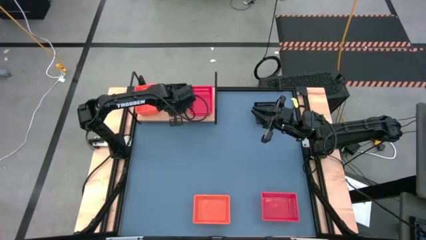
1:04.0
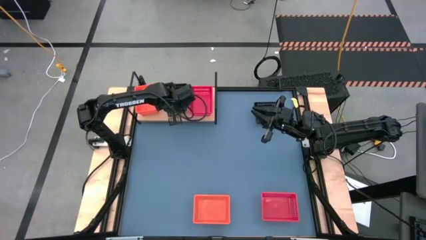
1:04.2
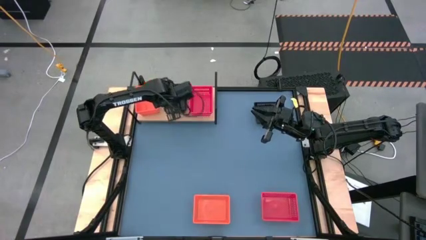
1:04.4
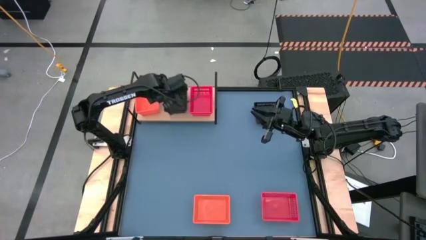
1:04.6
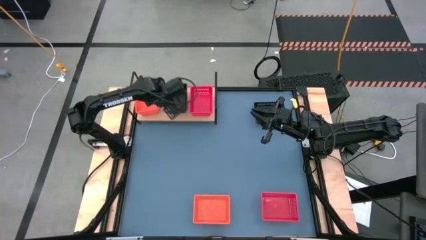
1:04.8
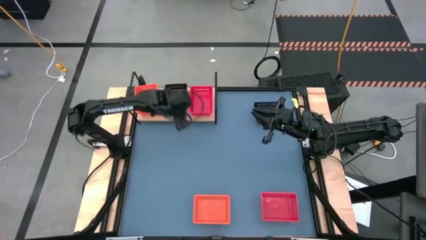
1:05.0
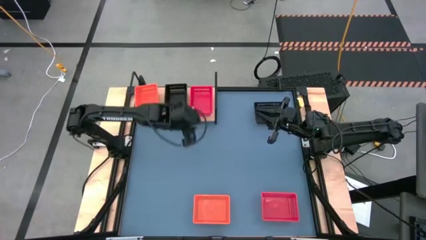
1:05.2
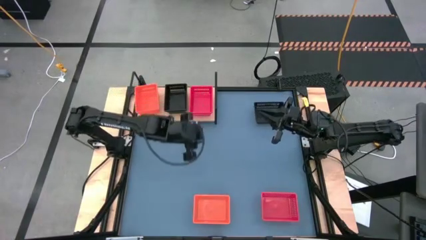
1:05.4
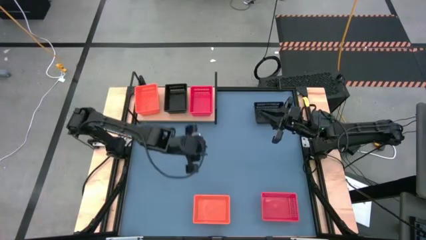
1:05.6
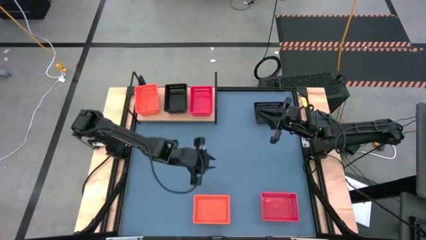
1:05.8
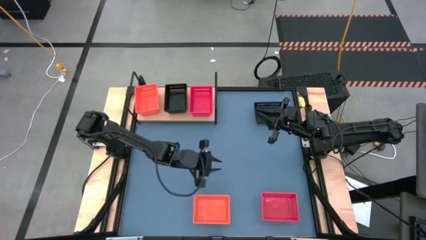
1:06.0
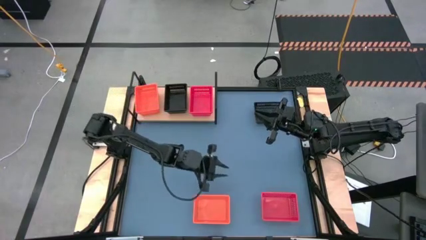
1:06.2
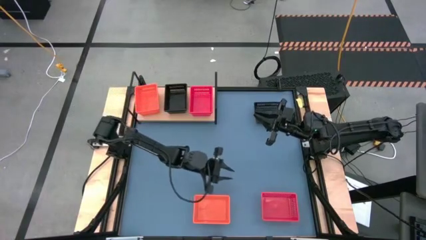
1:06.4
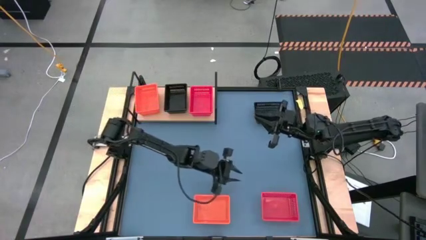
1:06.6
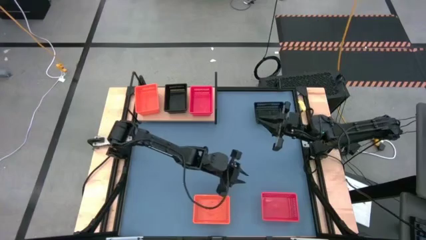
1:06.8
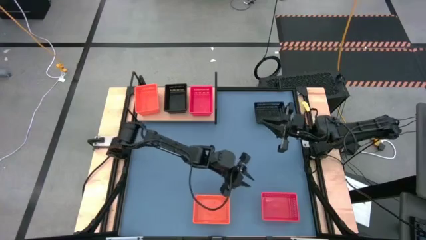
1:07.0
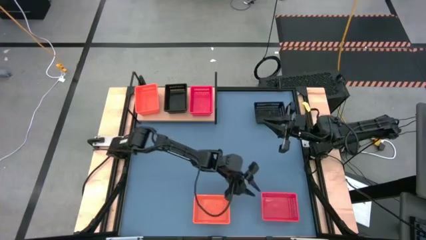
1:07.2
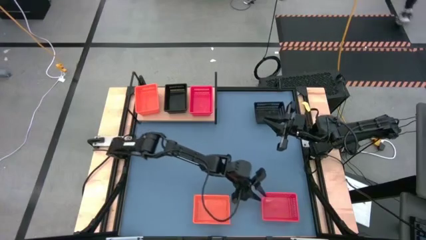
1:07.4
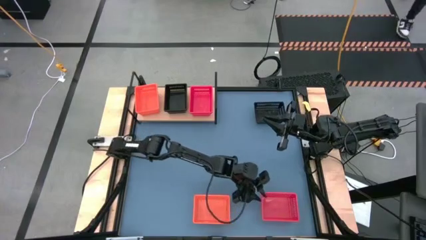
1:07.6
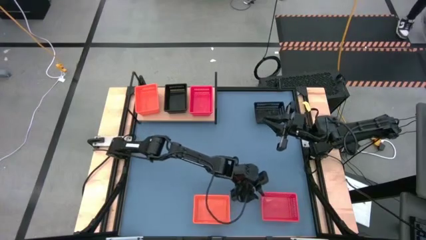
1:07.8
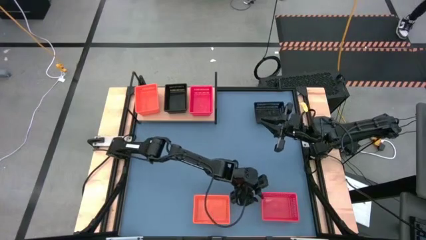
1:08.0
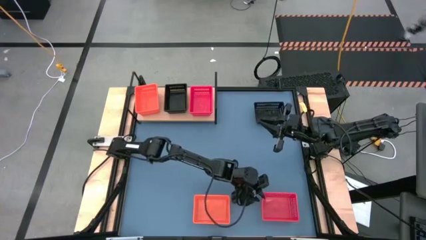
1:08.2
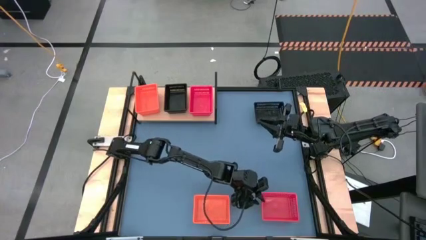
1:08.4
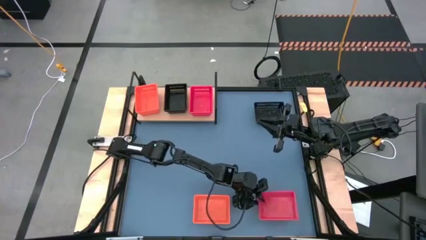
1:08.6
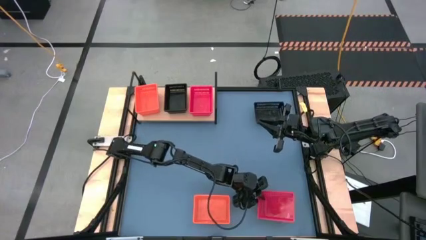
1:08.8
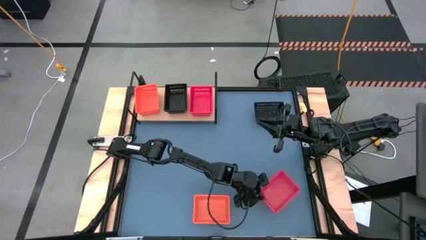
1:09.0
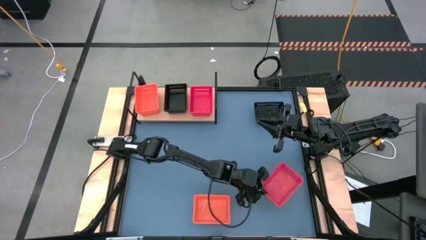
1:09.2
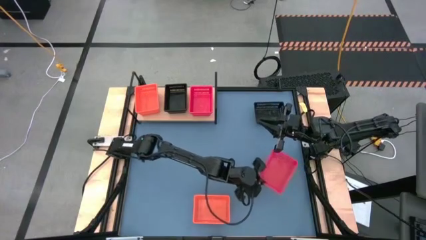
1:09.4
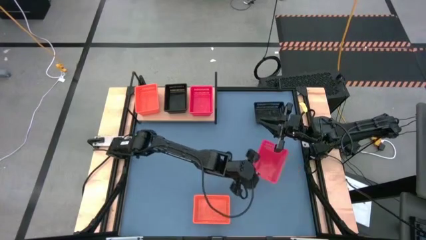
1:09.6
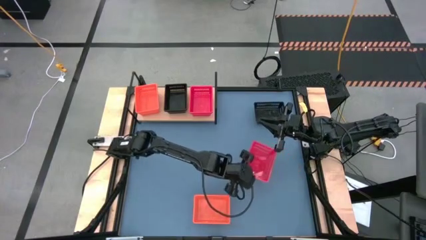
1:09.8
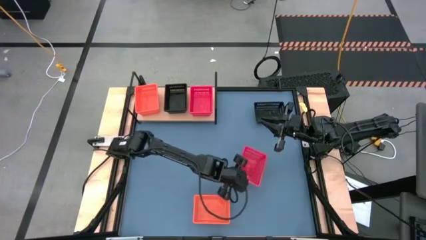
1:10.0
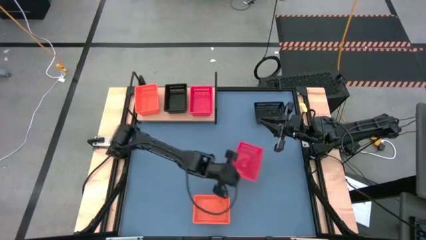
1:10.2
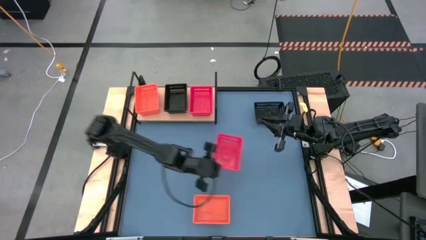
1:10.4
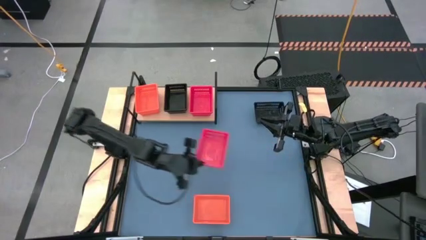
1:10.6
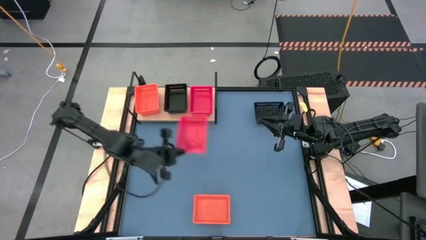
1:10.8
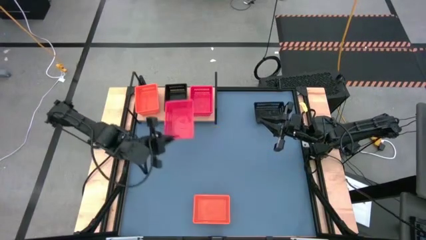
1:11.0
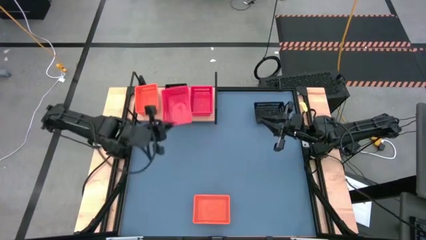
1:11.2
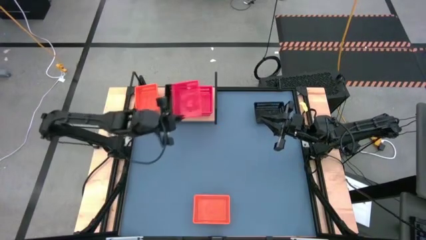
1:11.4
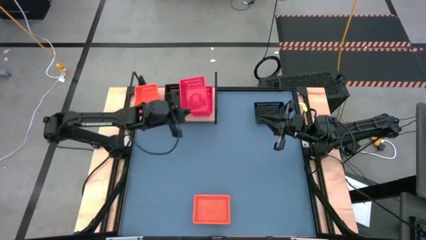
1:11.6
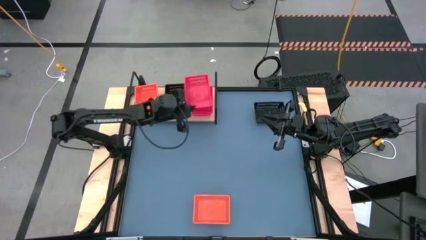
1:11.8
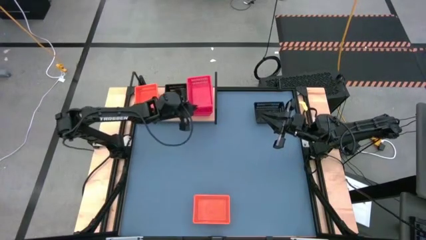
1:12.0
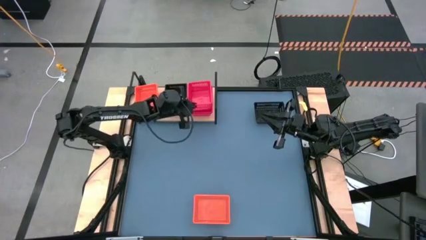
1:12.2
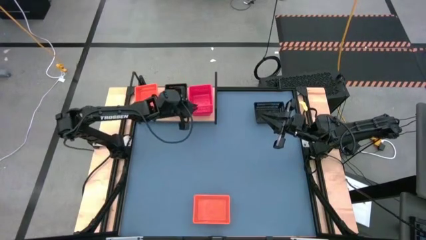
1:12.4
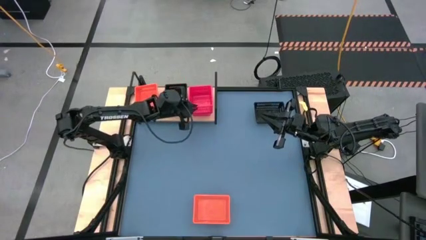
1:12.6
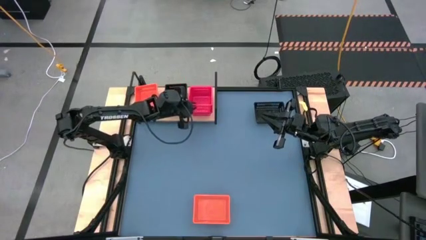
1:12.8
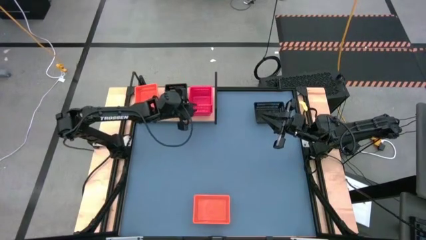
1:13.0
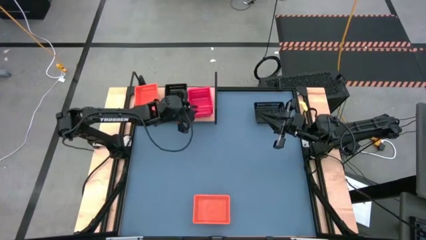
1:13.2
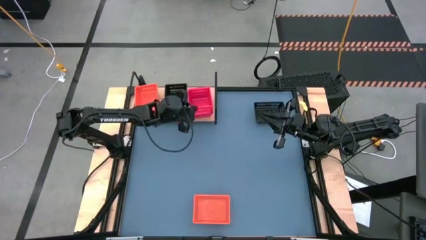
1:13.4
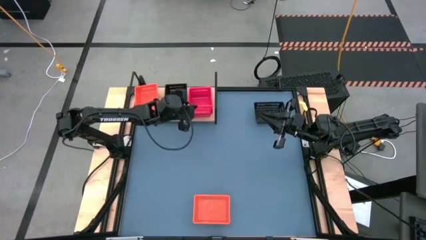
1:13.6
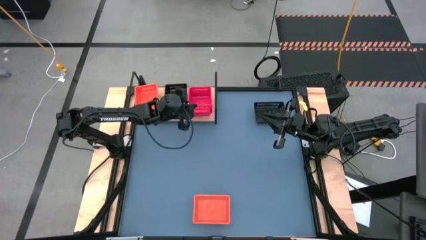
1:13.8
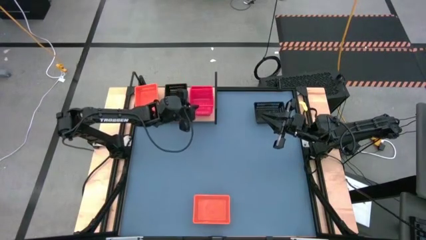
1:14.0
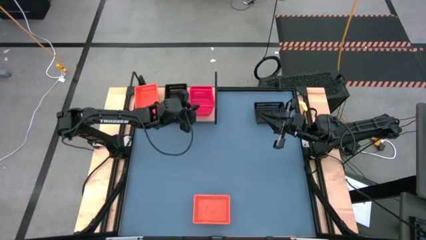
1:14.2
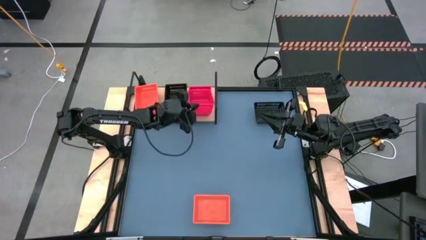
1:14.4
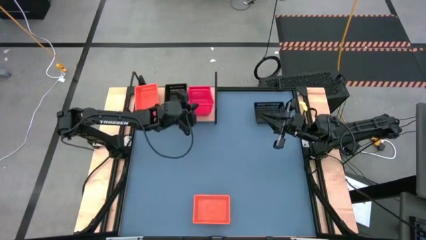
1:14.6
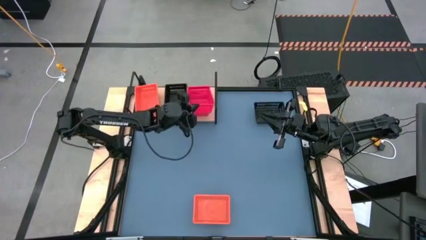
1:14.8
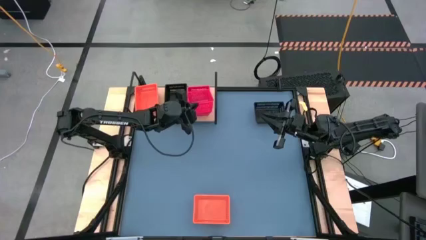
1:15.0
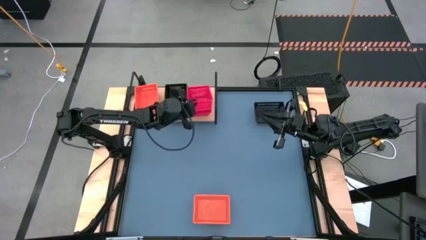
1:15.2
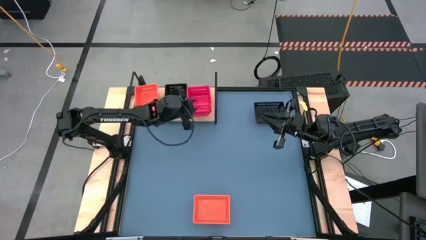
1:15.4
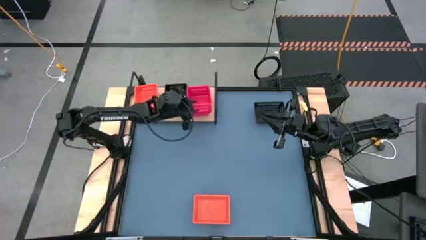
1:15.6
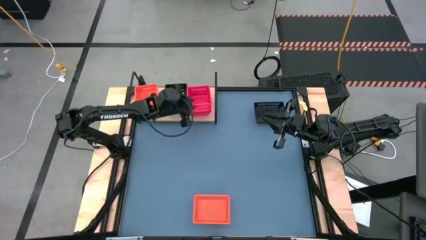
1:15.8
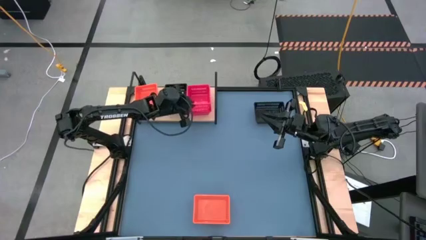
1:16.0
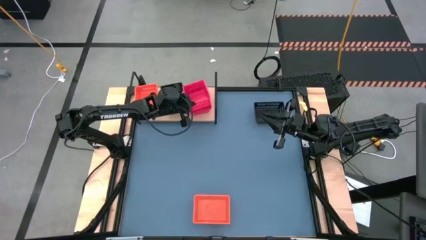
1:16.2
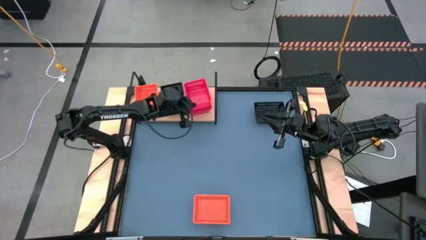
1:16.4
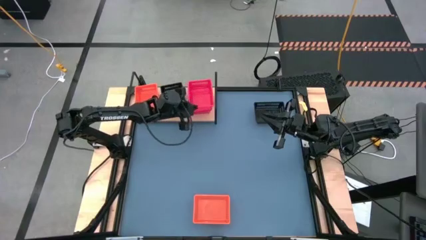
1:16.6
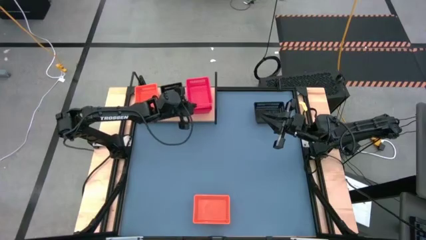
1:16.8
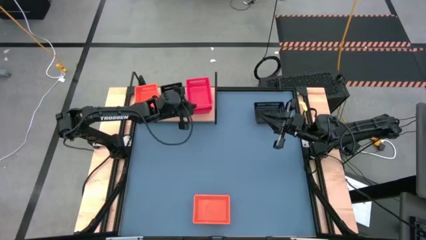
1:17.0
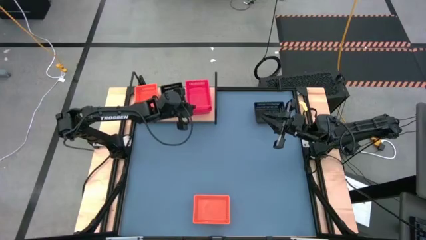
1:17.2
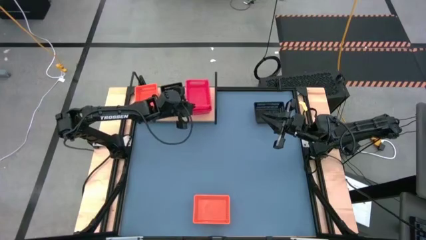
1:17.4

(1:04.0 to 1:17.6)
Task: Stack baskets on shelf by color
Stack the red bin on top of the other red bin on the shelf

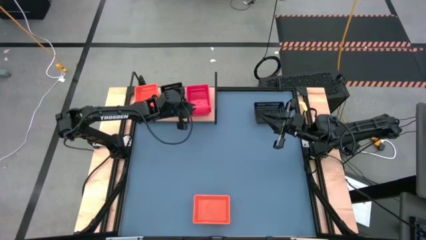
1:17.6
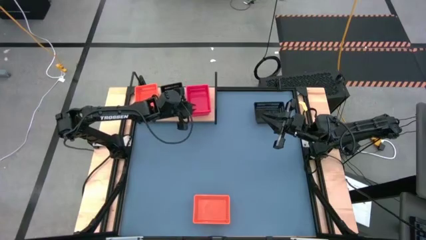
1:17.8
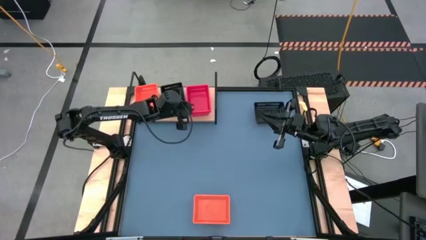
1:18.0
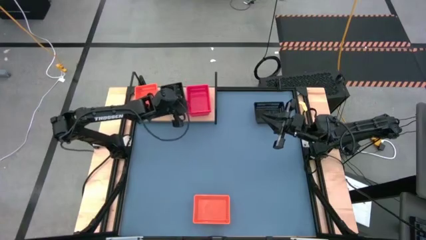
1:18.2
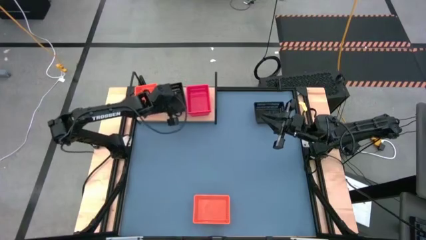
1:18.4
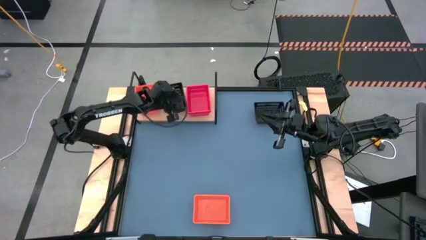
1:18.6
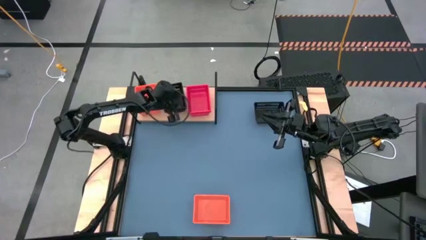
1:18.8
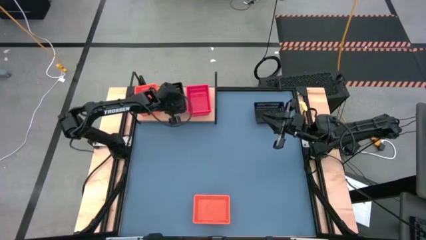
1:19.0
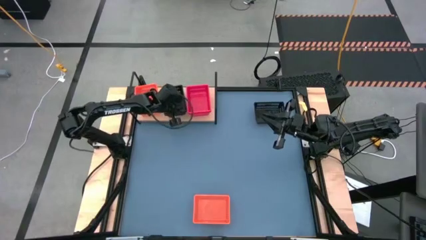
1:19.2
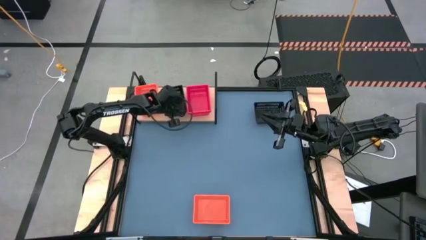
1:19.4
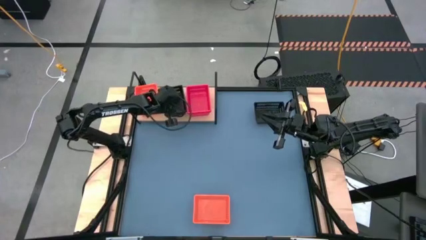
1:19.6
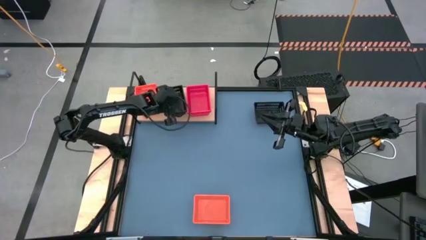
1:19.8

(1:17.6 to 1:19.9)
Adjust the black bin on the shelf

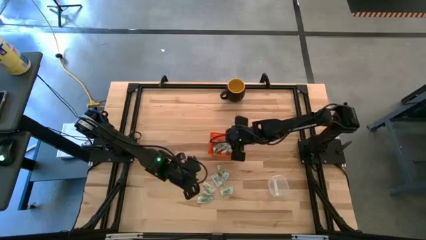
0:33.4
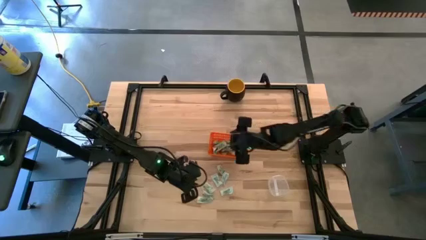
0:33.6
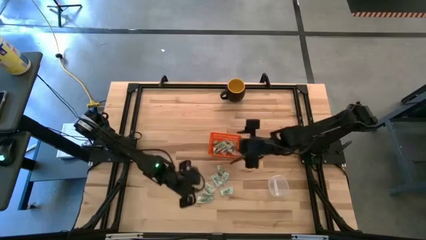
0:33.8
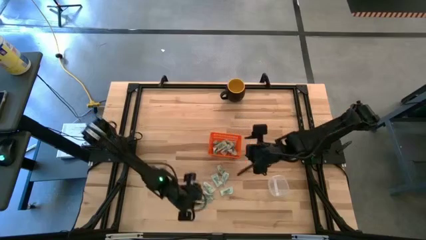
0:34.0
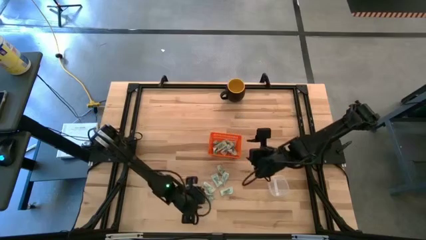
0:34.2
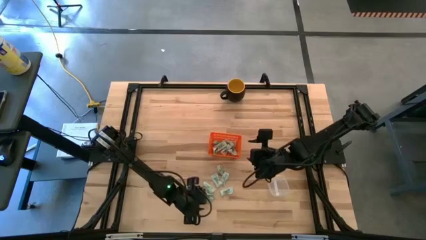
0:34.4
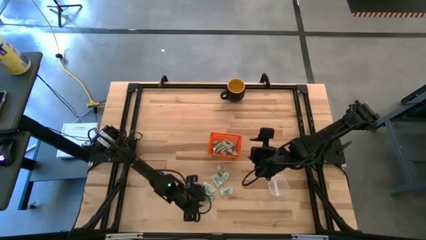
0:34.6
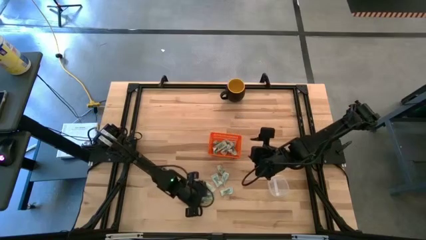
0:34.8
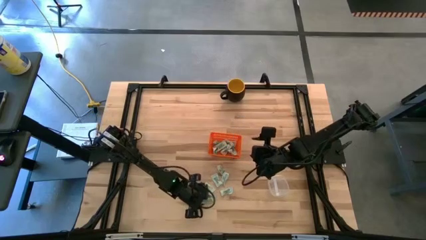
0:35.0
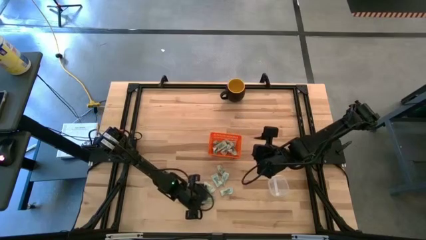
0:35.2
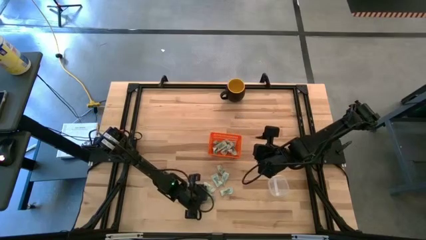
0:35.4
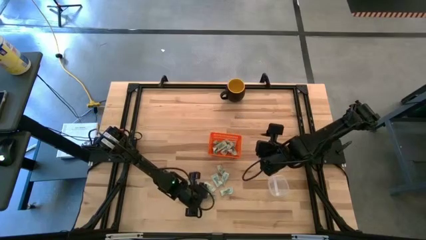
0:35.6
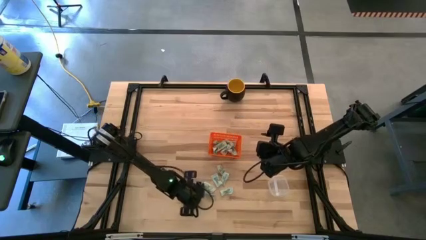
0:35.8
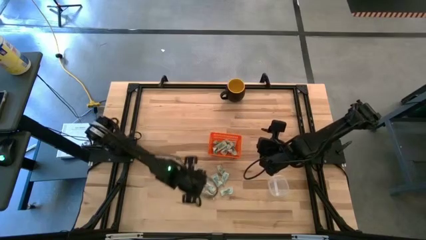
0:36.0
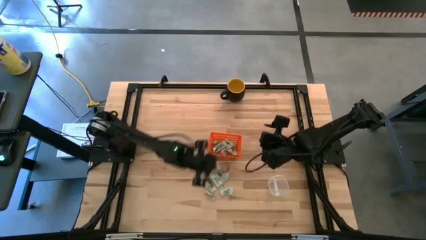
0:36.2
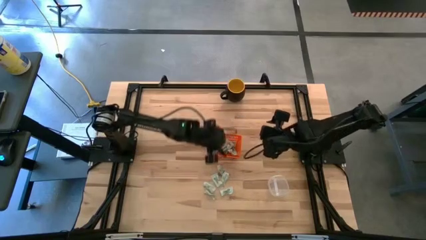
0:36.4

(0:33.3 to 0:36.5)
Task: Pick and place items into bin
Put the light green stevia packet into the orange bin
